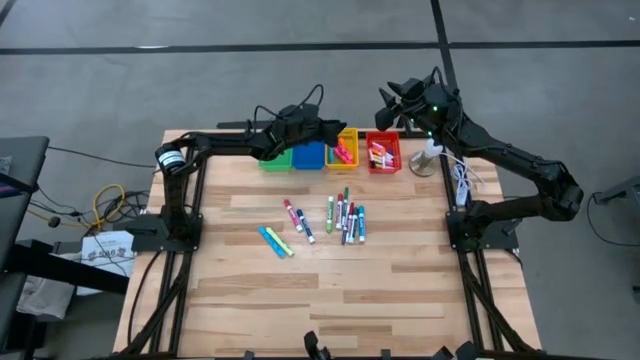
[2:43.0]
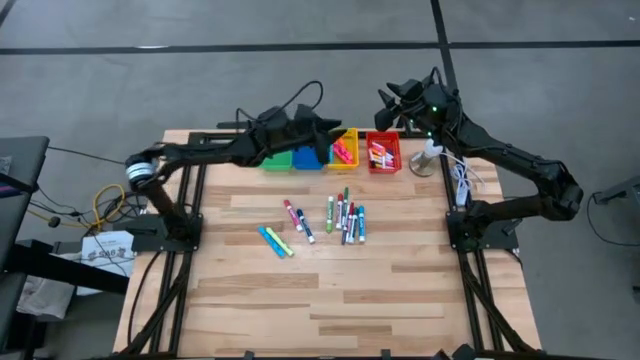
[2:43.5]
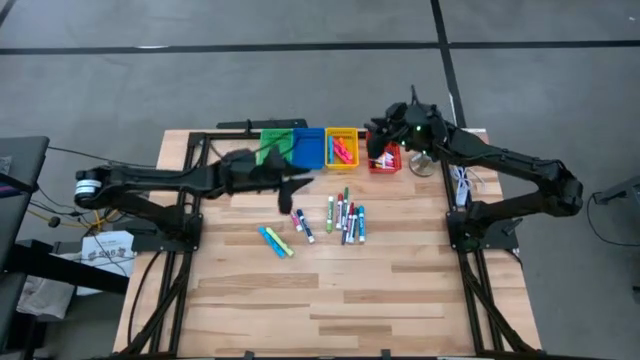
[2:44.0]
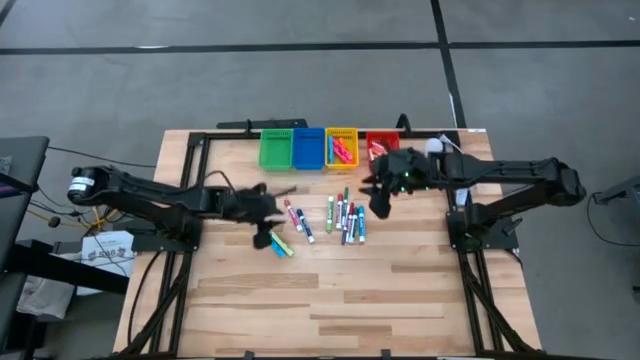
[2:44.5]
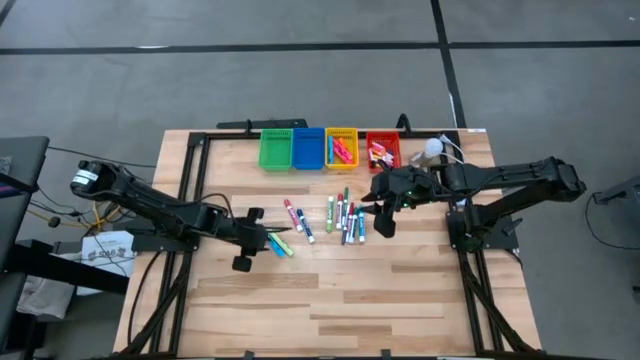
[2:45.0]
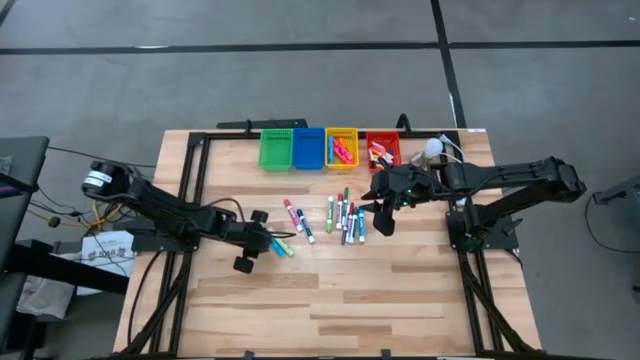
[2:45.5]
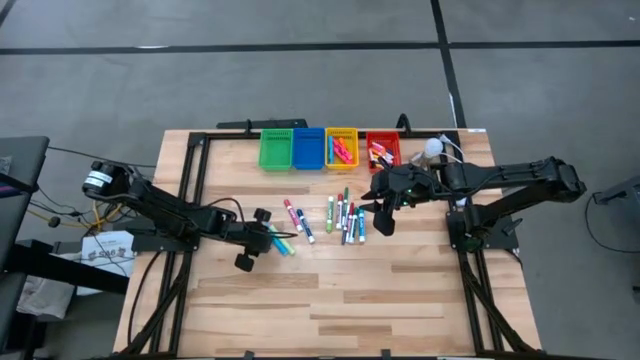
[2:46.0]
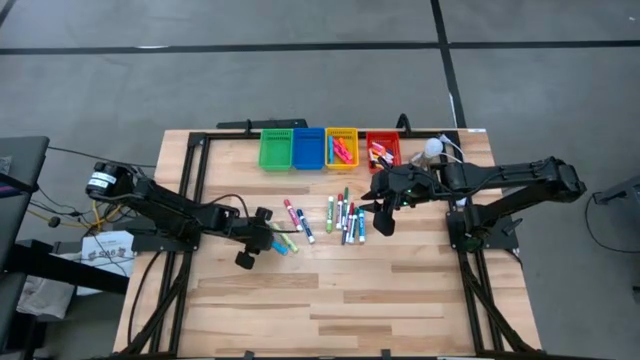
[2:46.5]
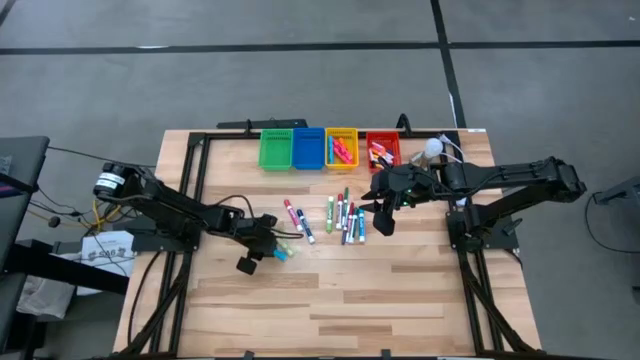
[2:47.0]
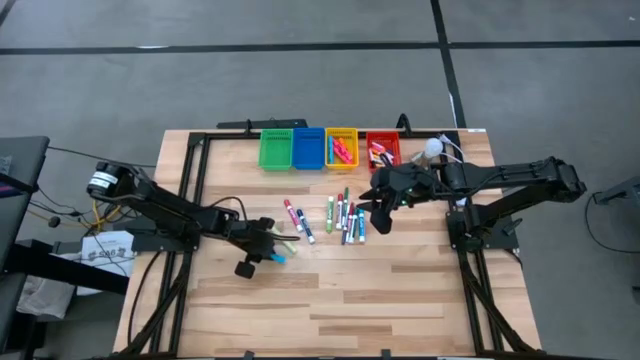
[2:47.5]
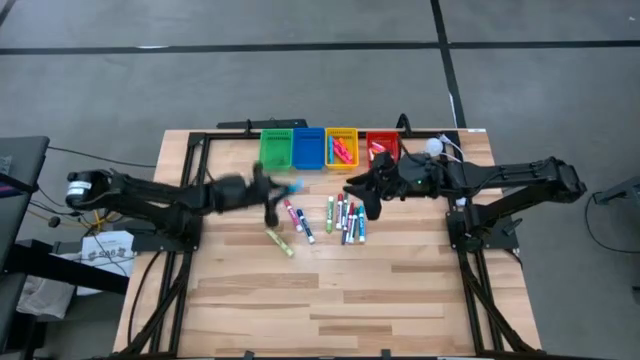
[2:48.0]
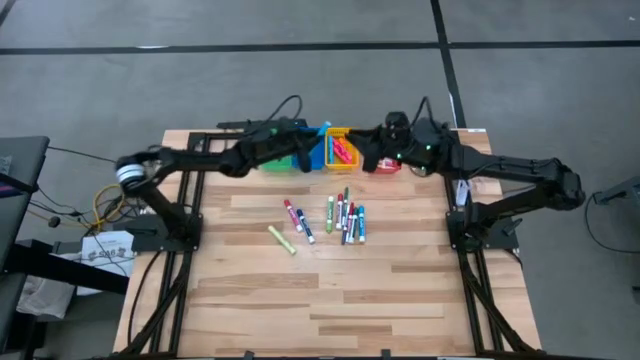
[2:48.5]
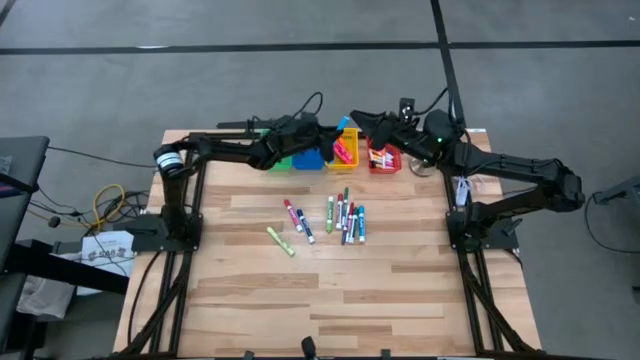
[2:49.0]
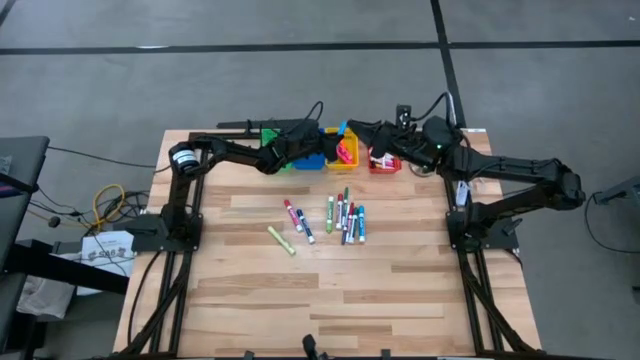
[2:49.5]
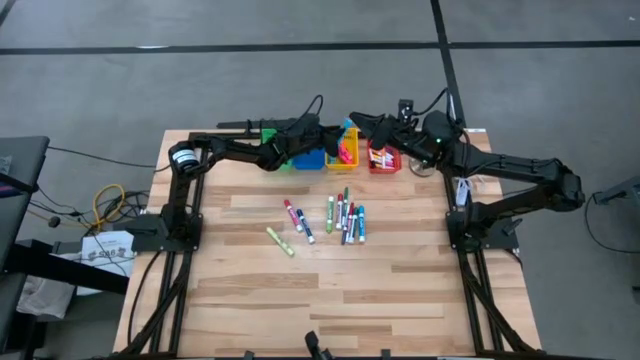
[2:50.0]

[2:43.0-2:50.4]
Task: Pick & Place Markers
Put the blue highlighter into the yellow basket

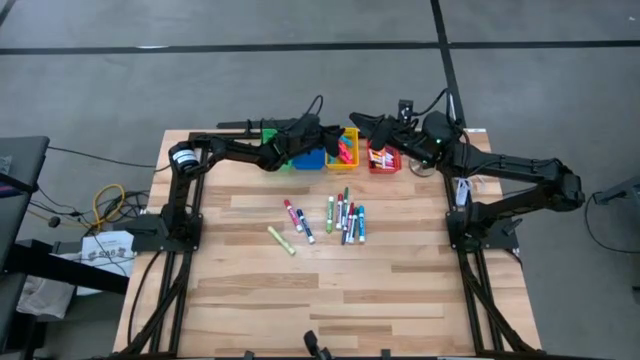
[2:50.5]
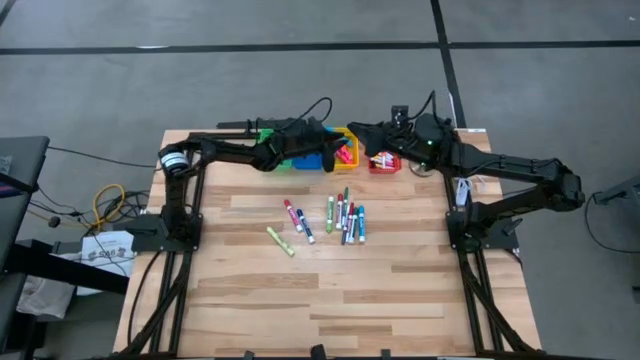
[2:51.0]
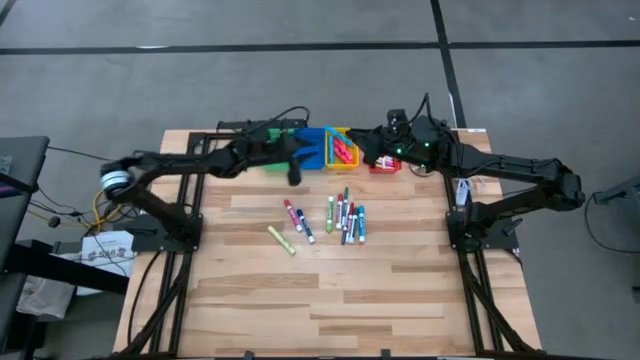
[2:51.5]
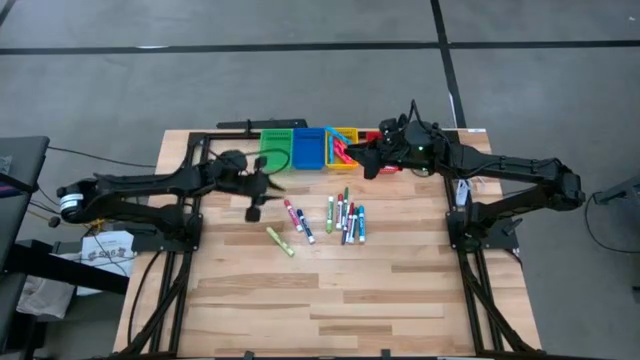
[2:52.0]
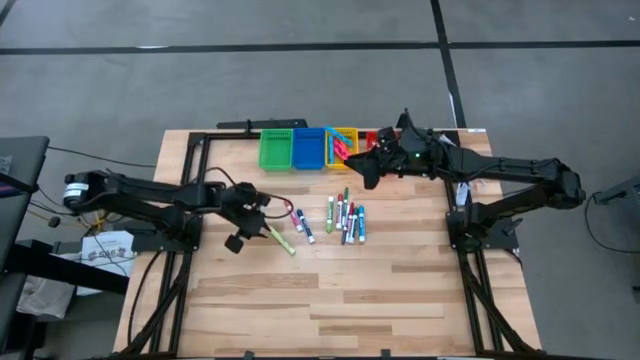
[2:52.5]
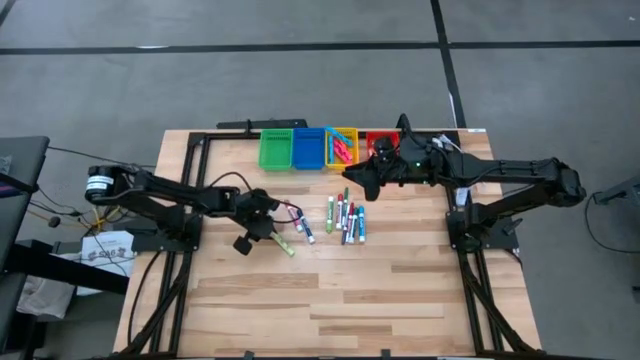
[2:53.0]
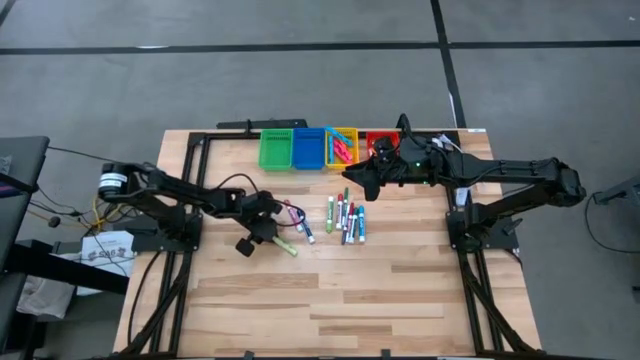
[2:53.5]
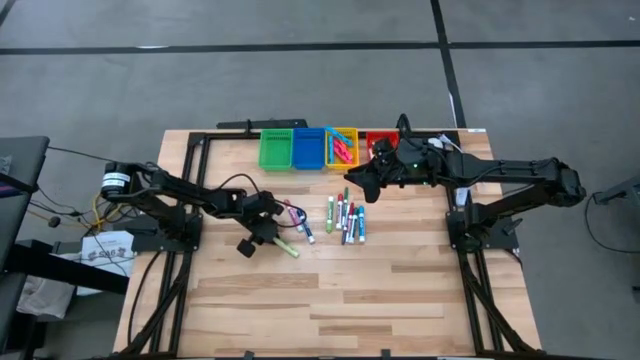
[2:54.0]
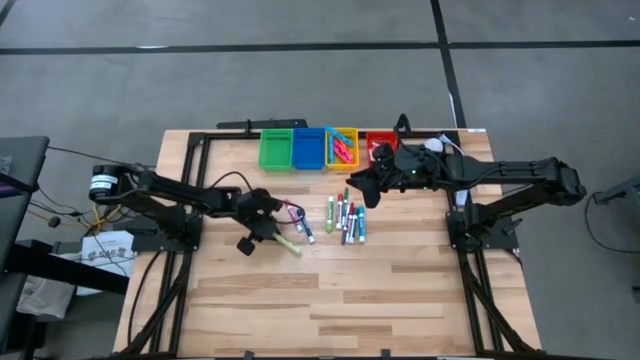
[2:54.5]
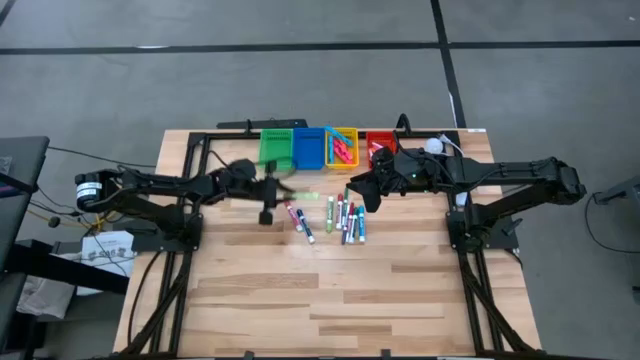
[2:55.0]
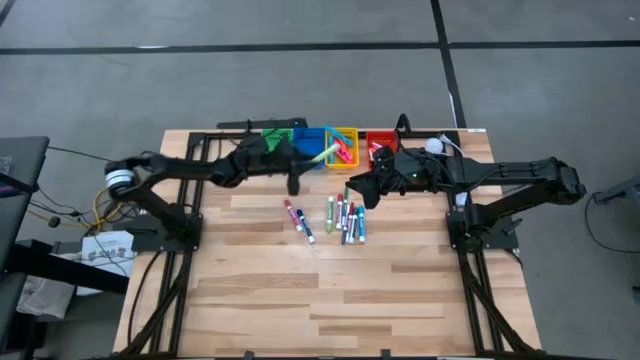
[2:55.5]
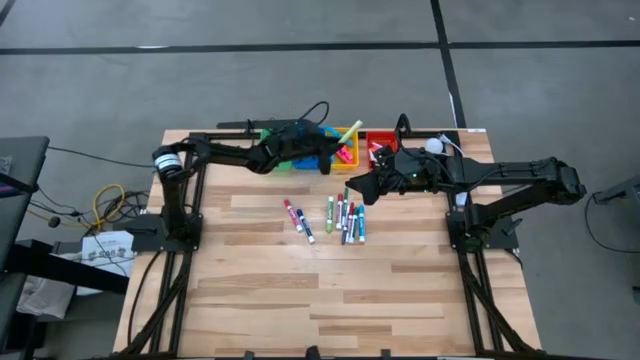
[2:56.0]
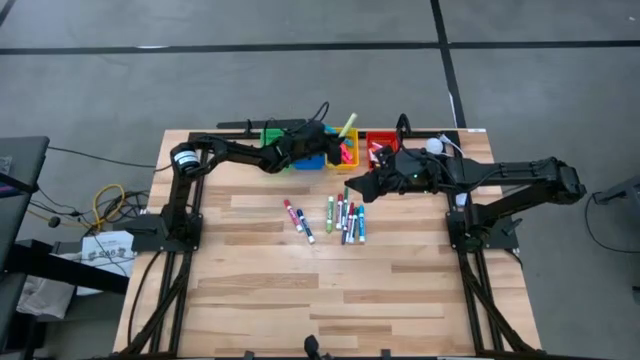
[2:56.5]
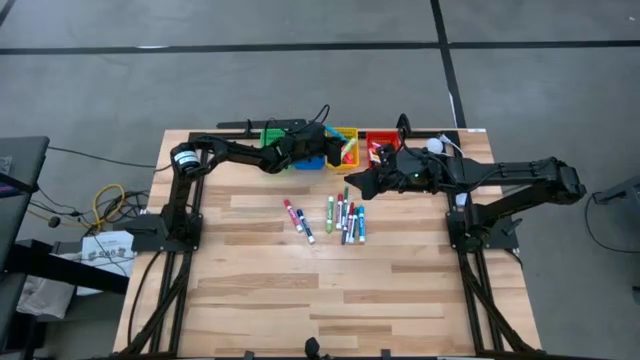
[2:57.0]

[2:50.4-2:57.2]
Put the light green highlighter into the yellow basket

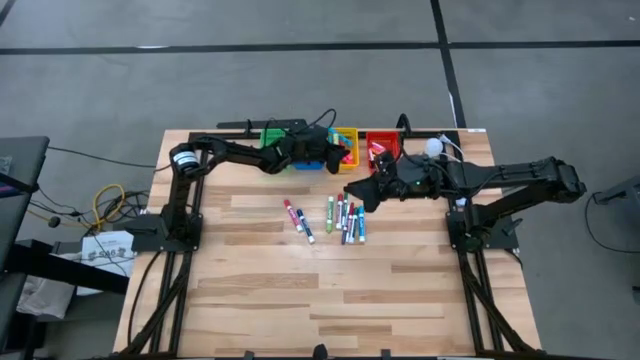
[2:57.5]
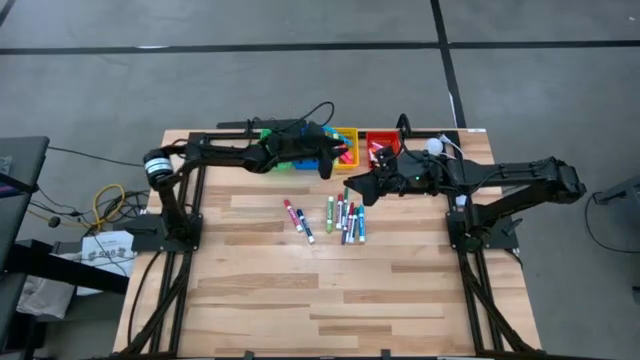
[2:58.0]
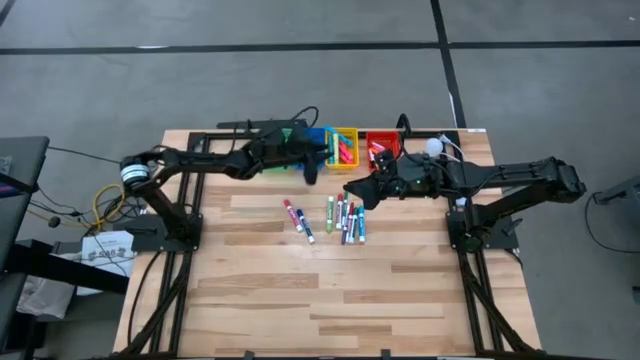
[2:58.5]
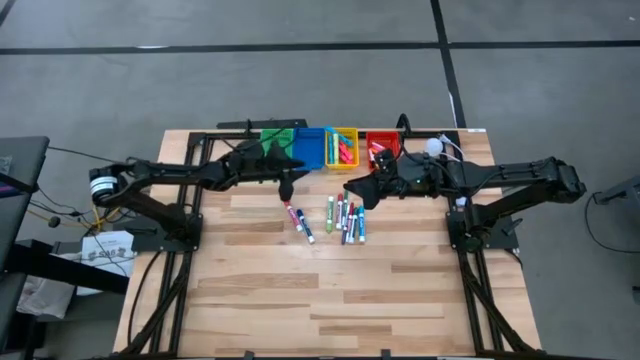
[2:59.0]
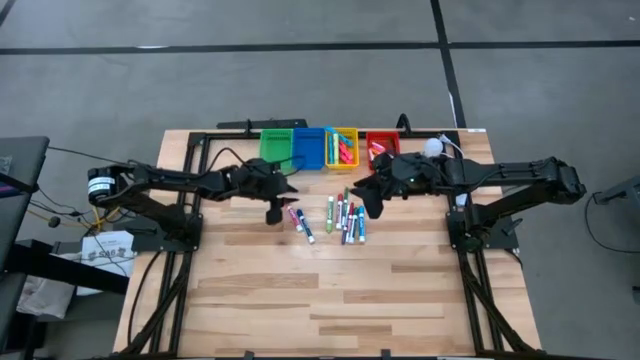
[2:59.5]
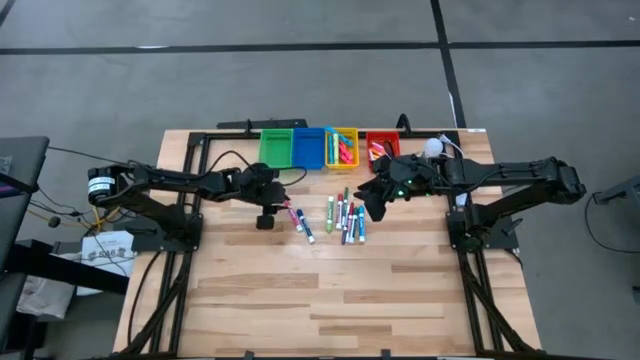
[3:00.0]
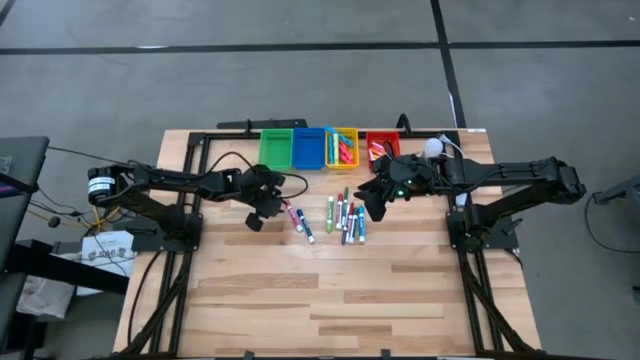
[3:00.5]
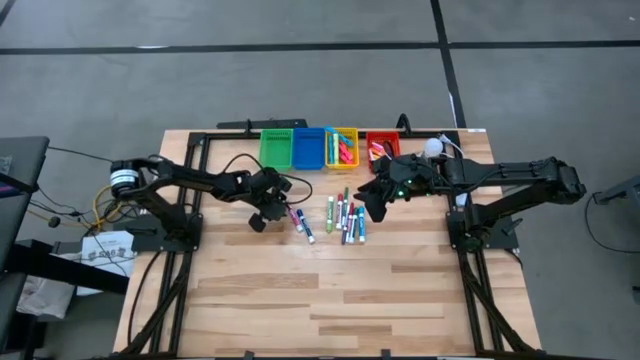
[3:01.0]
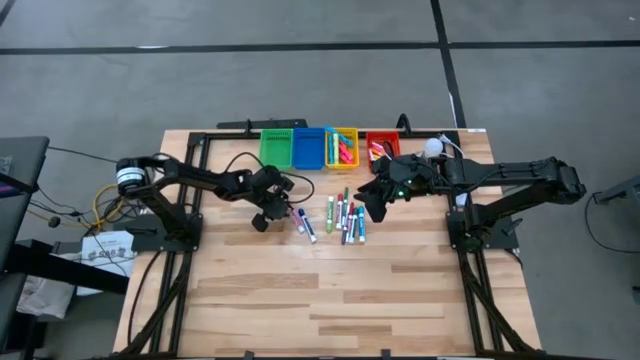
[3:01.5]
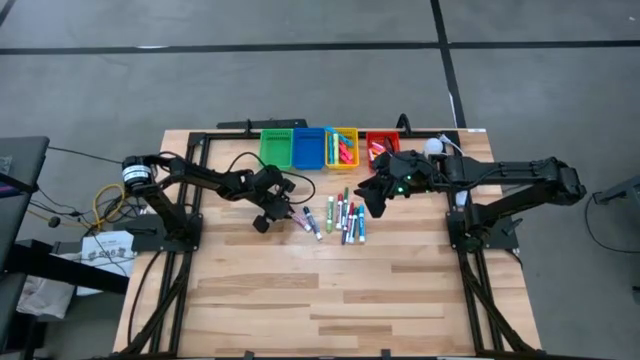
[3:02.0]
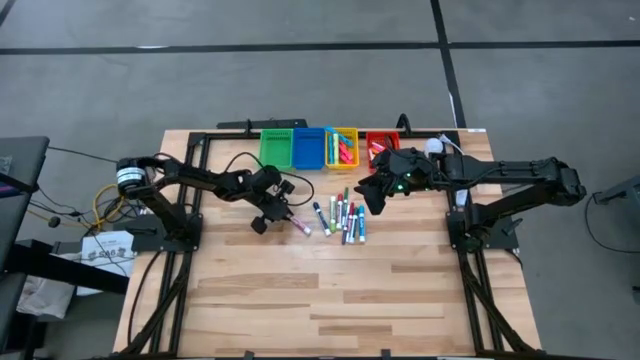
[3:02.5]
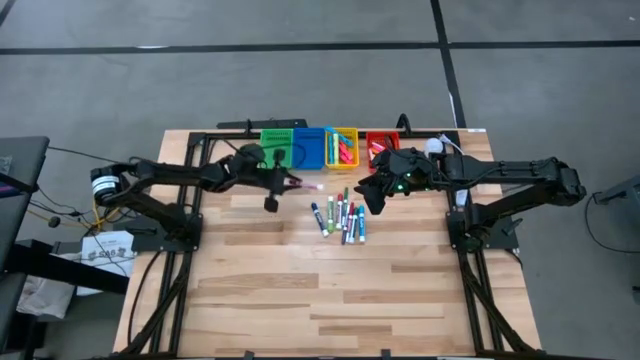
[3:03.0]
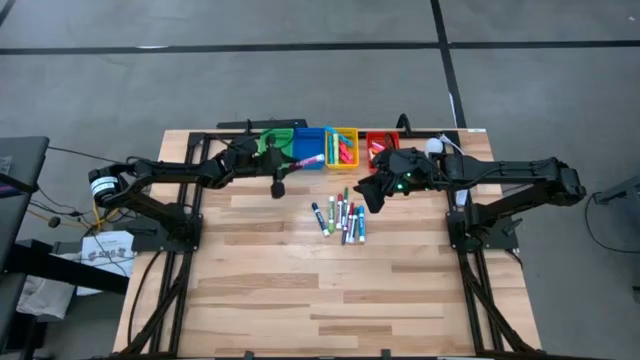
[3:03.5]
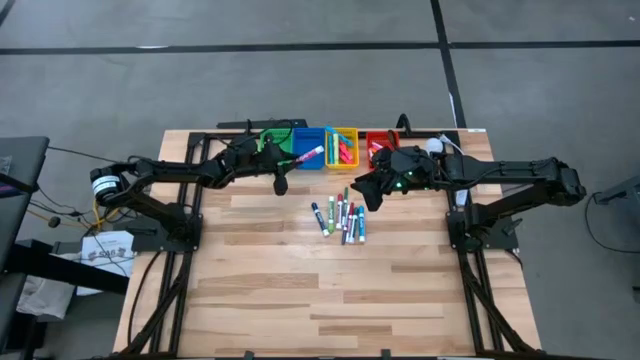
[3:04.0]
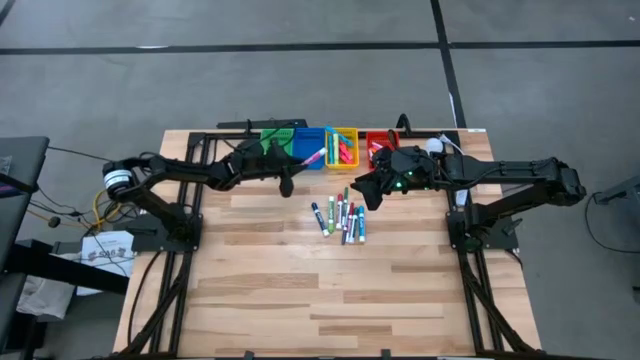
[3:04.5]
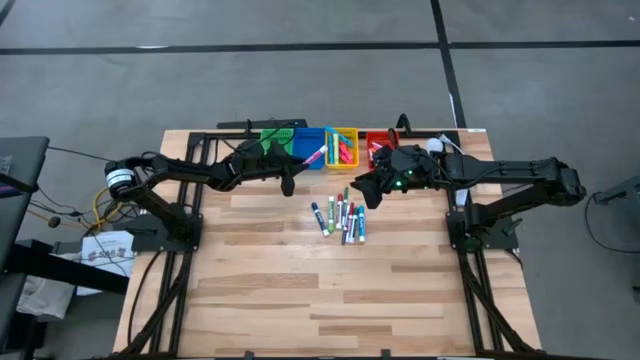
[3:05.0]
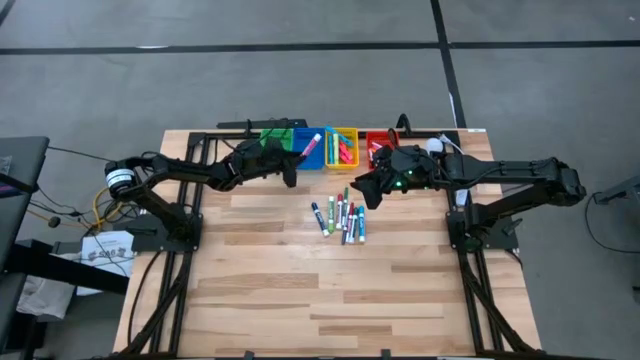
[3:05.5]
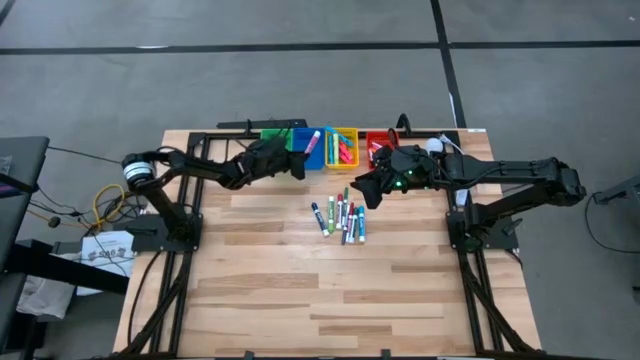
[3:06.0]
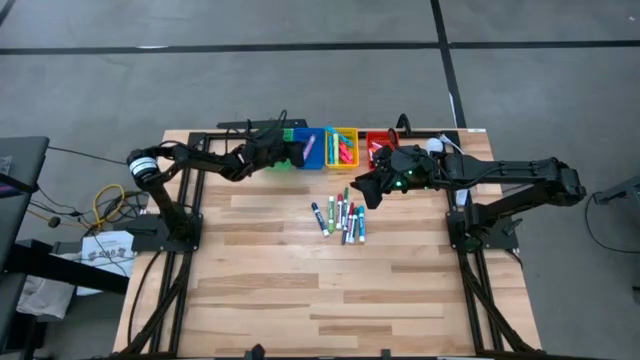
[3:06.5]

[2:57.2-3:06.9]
Put the pink dry erase marker into the blue basket
